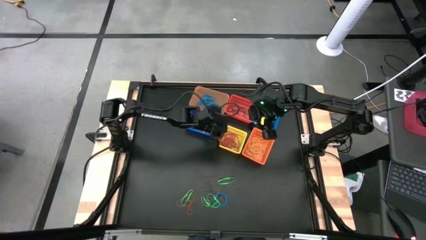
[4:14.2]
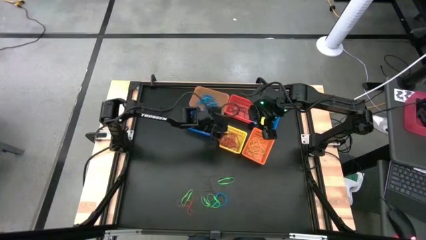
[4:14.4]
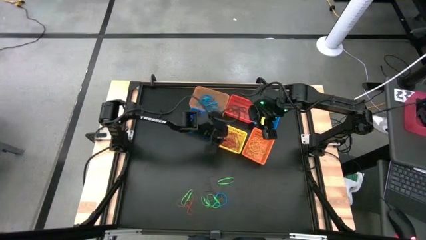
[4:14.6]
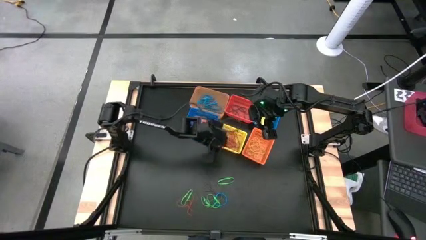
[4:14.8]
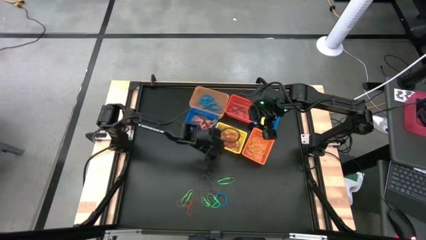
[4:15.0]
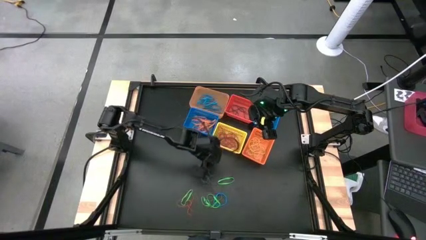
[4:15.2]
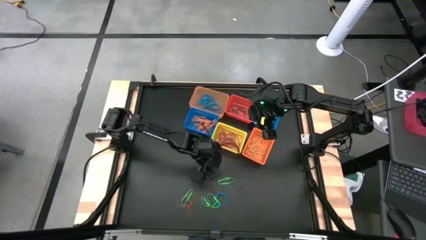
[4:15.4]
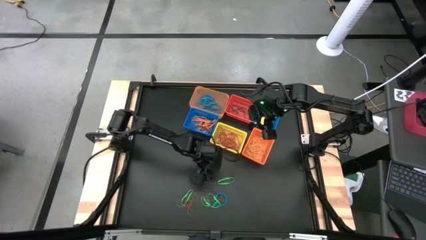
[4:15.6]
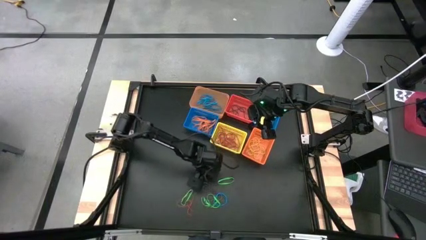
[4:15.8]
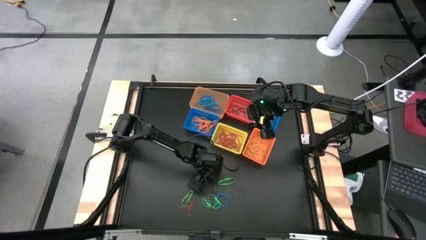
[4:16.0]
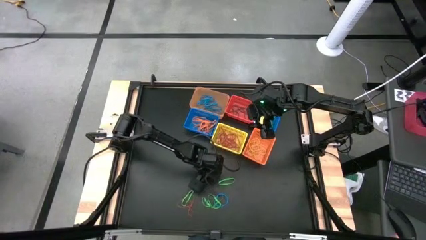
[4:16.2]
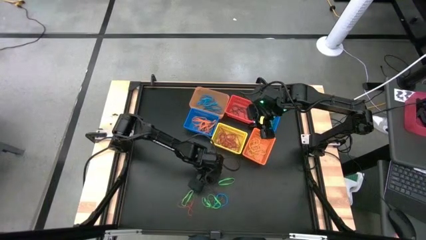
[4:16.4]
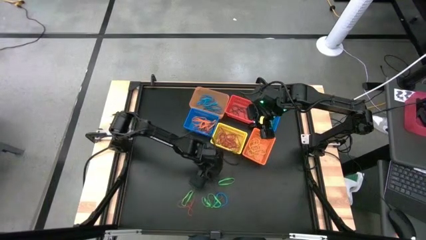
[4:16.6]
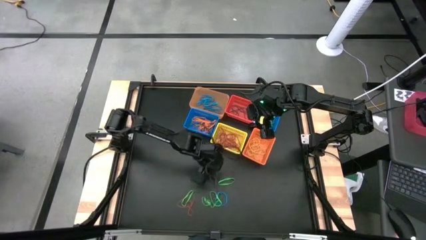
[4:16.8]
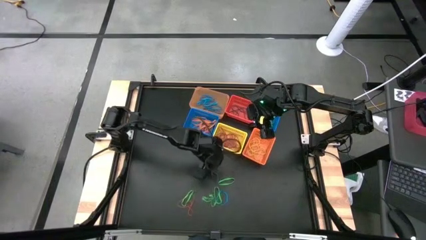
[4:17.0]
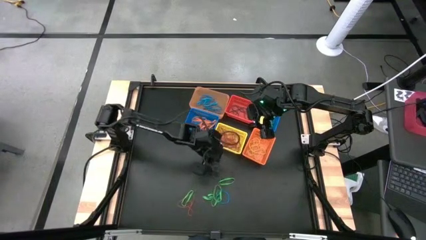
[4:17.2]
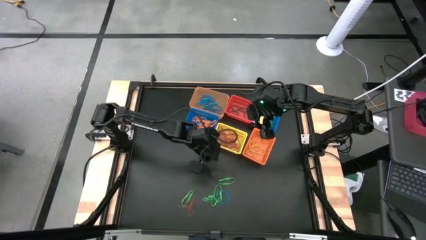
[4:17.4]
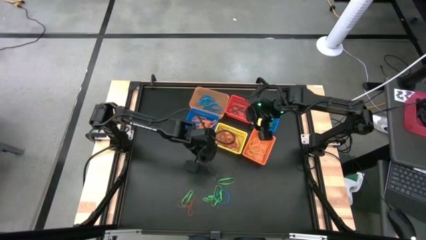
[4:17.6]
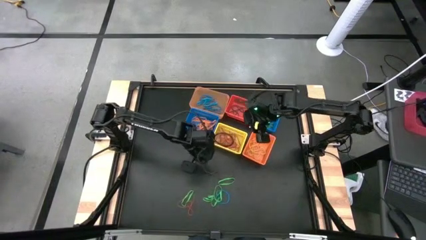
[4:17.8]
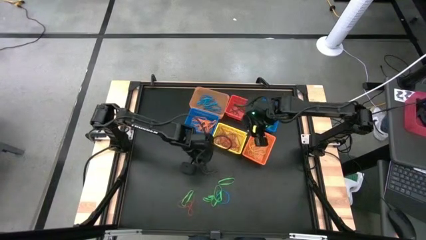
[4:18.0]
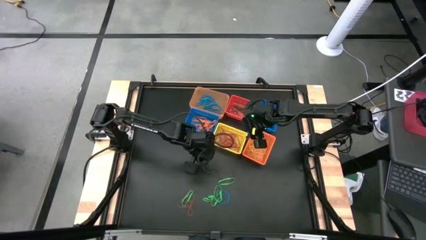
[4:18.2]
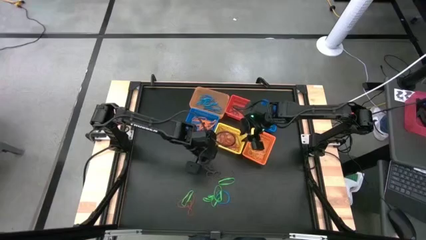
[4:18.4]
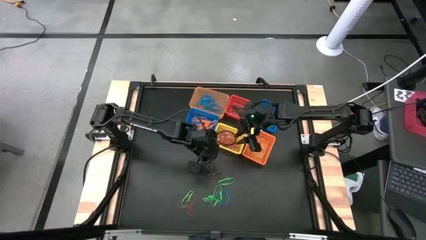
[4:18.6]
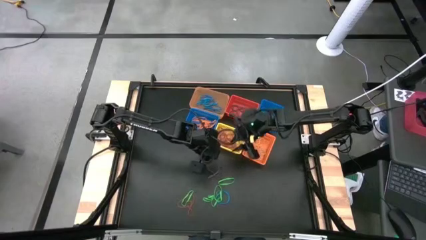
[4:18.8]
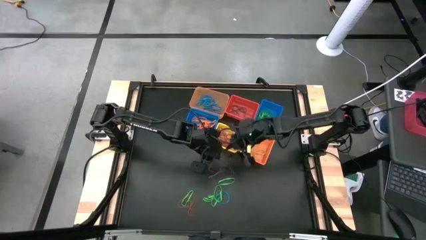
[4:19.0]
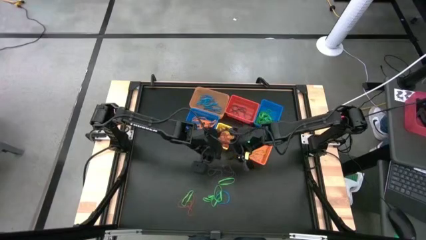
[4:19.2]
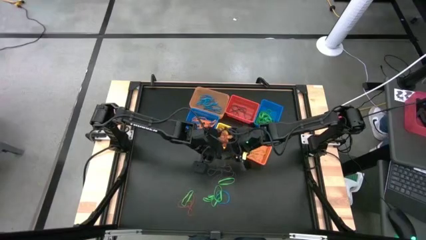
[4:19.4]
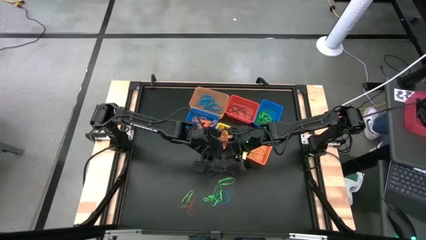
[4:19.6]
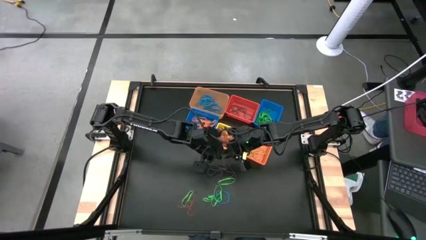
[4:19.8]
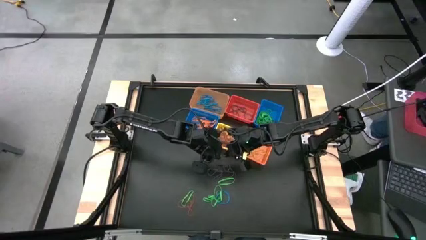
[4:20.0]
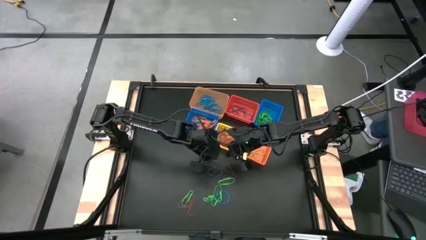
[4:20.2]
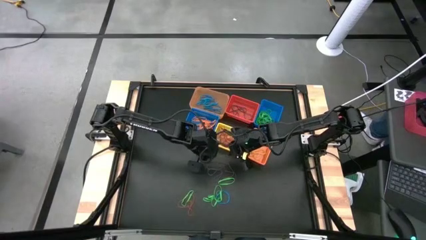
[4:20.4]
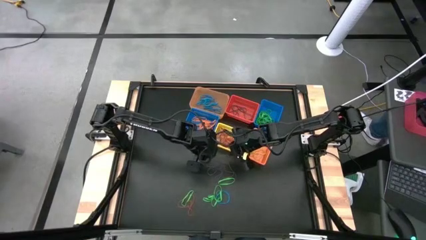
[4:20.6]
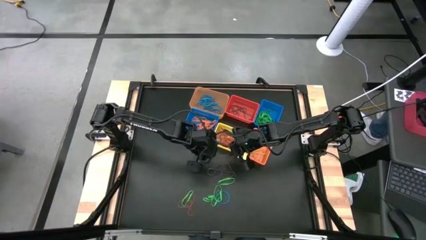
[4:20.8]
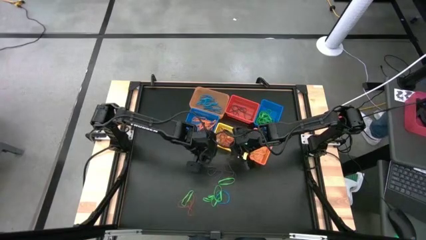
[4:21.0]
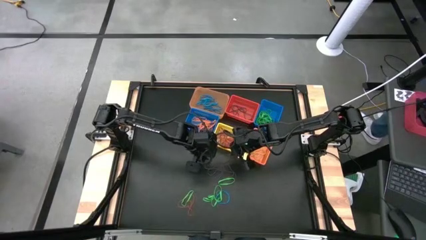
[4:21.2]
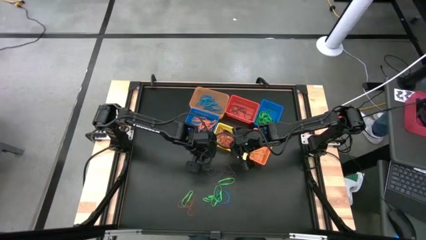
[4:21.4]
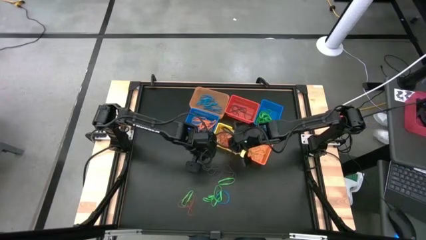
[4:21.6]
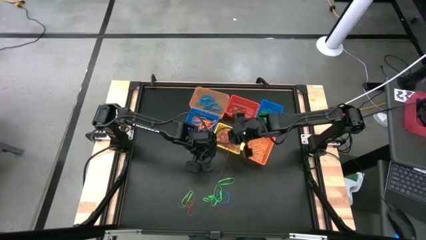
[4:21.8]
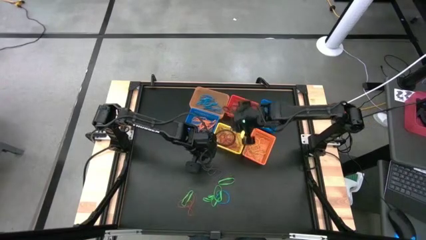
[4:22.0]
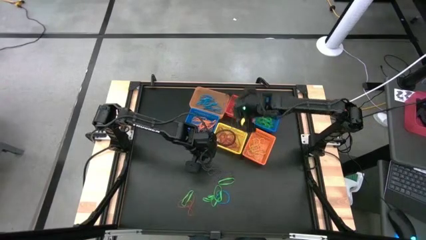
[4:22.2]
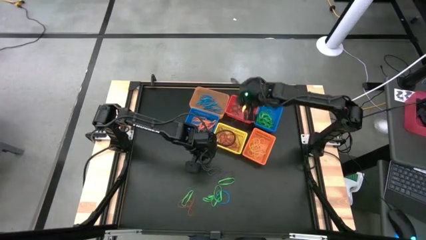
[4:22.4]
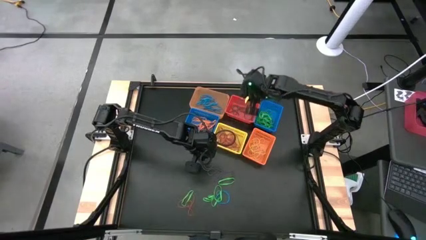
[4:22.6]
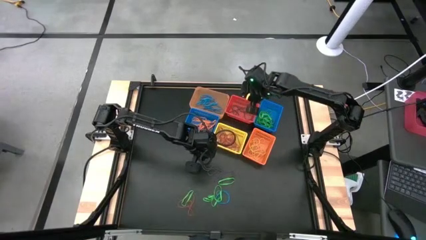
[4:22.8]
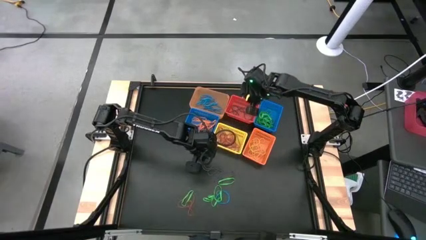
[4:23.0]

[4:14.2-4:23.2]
Task: Sort rubber bands into baskets
Put the violet rubber band into the pink basket

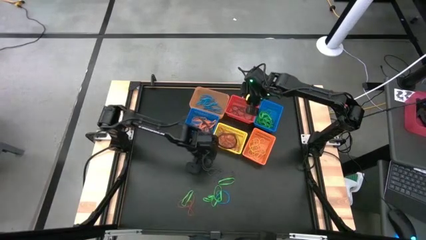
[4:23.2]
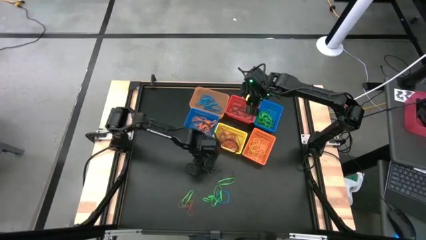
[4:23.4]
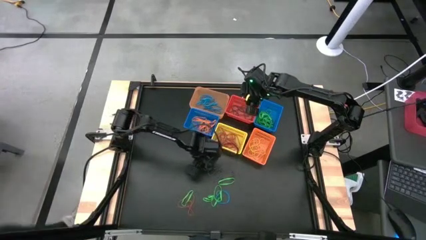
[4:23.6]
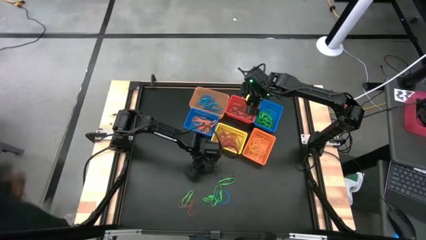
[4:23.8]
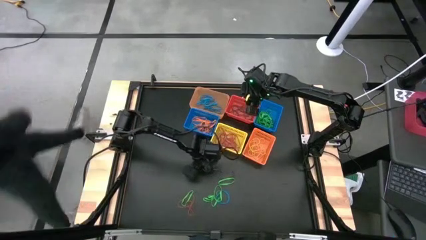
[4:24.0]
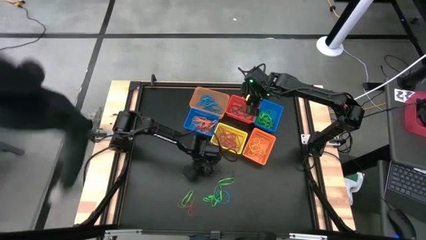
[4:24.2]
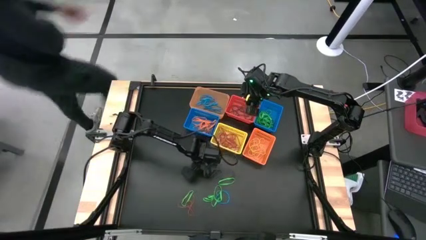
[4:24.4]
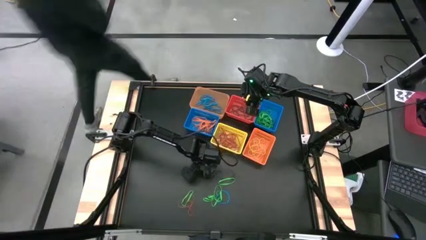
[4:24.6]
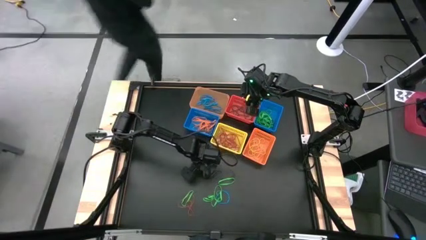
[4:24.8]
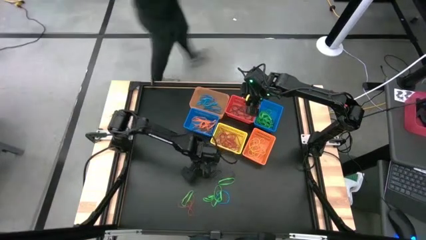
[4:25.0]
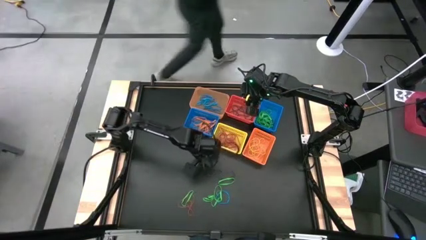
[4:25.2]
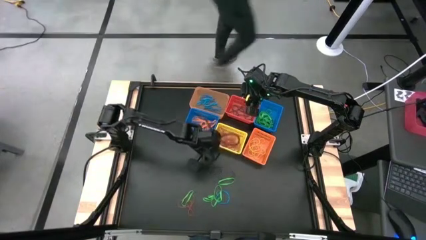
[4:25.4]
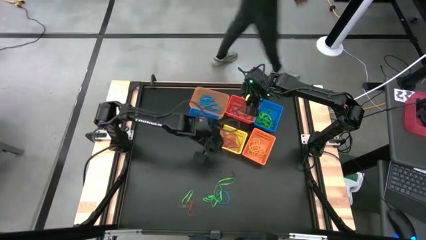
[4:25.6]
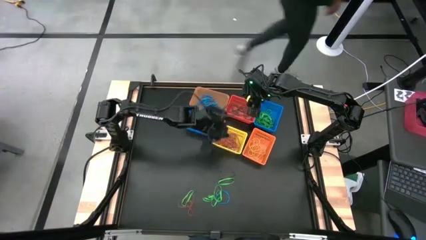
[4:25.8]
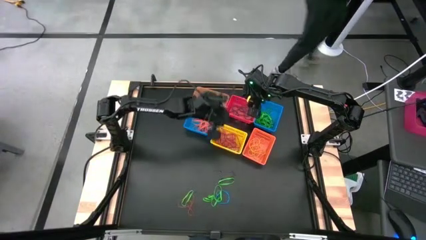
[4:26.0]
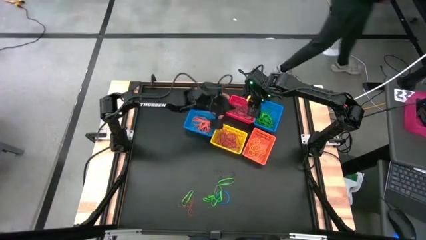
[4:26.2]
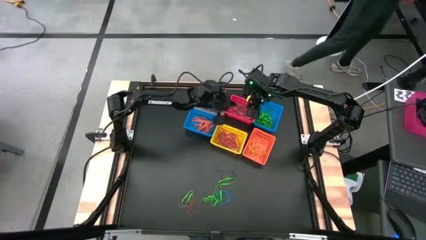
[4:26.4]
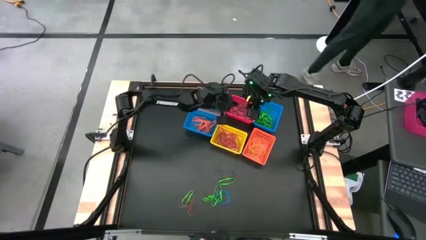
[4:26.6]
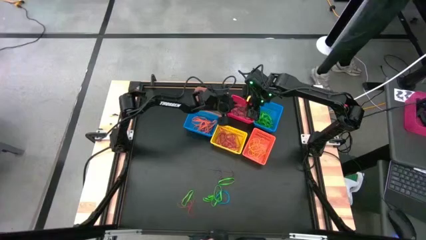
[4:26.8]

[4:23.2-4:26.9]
Put the violet rubber band into the pink basket

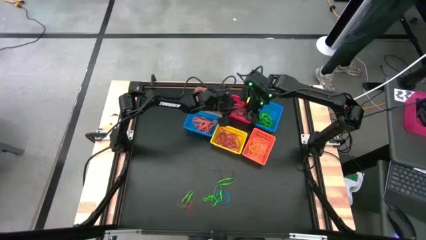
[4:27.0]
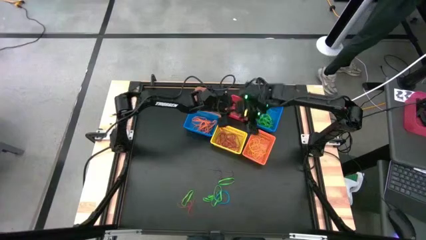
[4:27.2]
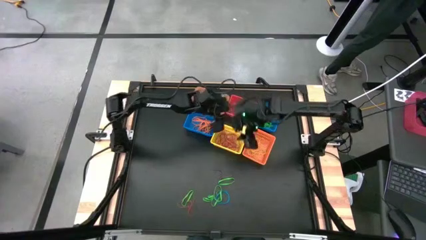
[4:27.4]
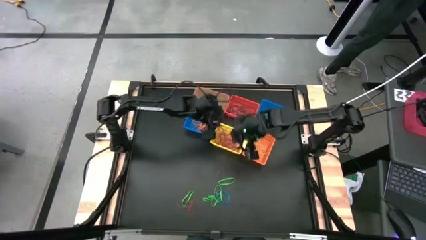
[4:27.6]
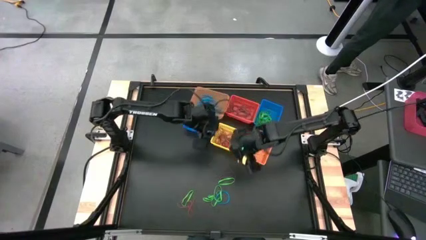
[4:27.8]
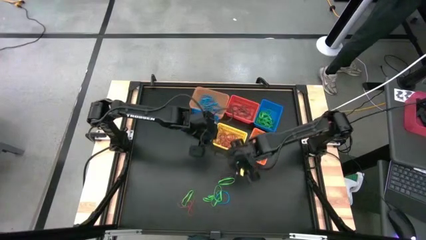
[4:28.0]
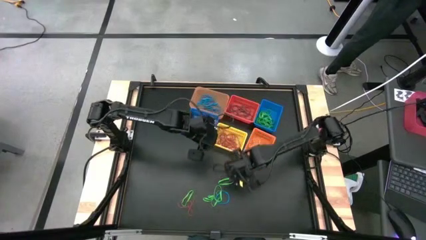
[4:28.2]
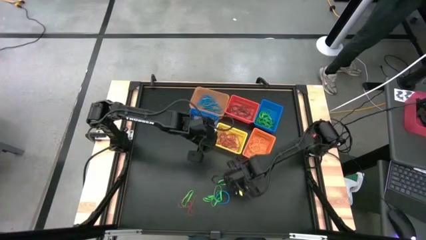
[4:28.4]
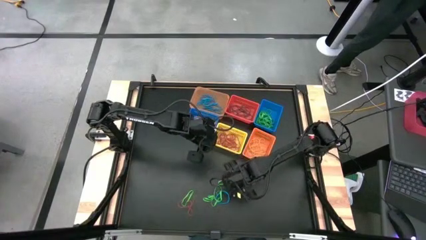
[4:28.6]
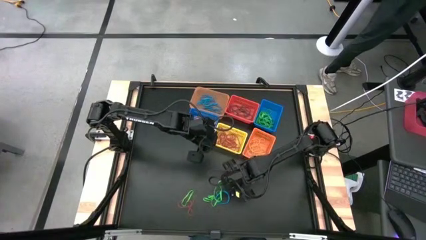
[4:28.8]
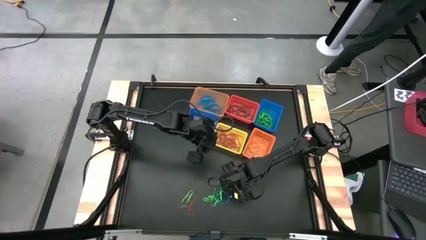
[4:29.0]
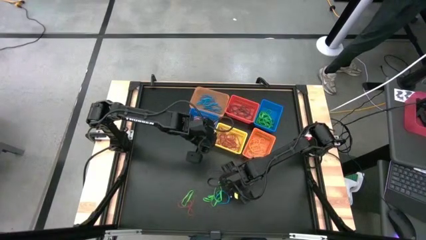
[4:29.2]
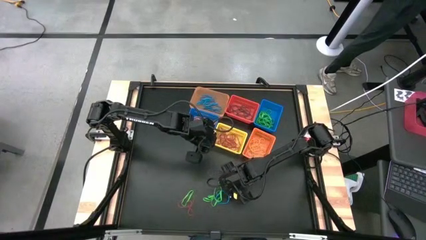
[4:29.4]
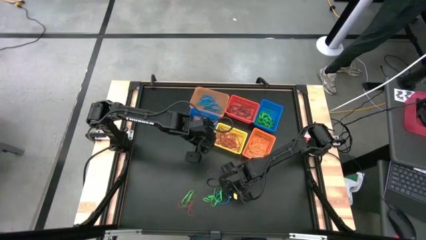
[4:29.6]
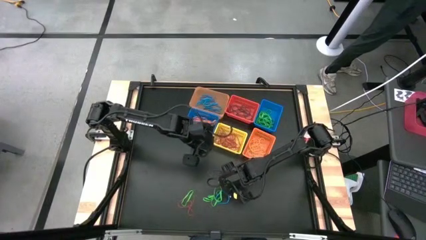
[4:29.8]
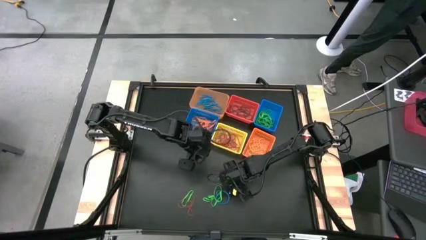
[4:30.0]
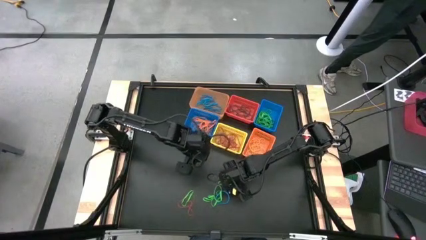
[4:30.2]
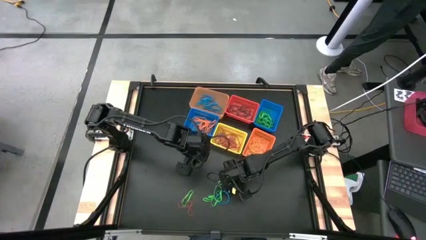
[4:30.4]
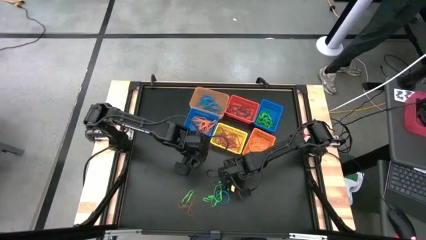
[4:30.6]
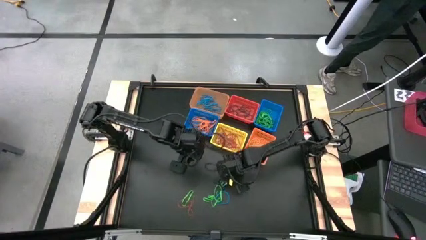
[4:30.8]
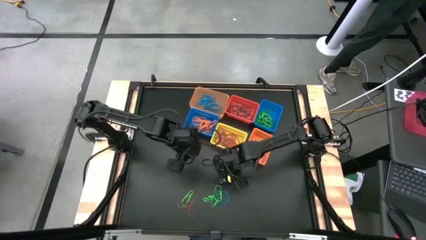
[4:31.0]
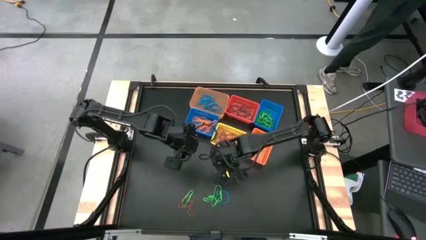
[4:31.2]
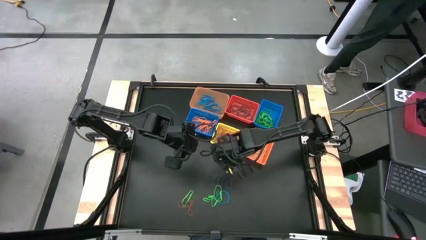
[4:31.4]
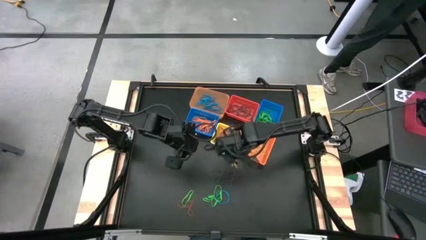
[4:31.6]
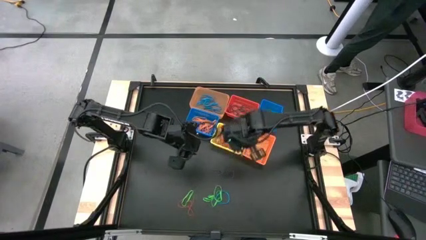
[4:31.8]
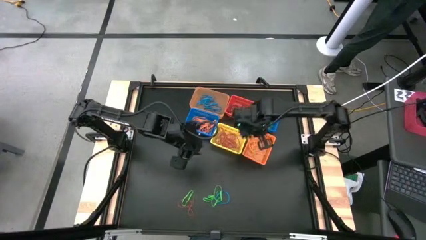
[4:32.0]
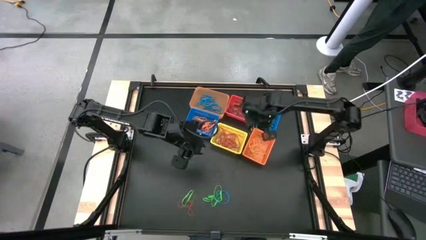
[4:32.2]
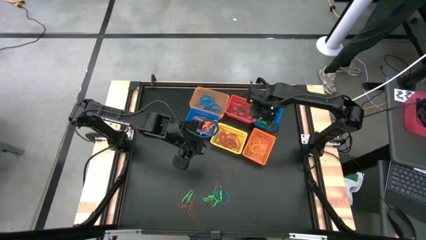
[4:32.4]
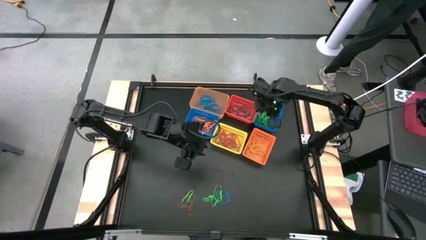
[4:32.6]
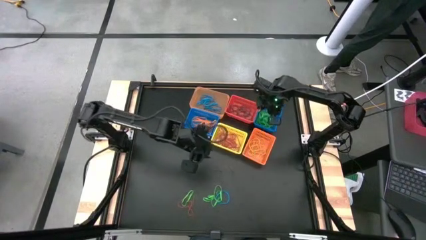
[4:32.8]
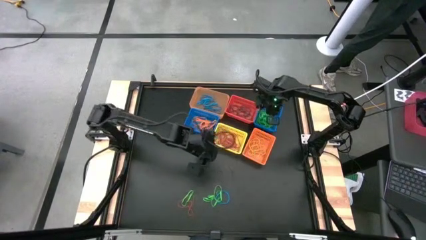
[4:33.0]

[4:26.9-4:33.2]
Put the green rubber band into the right blue basket
